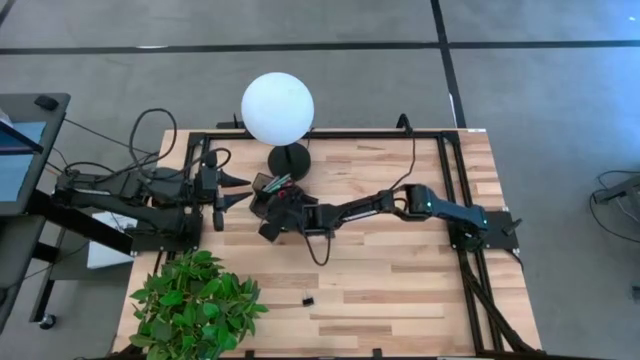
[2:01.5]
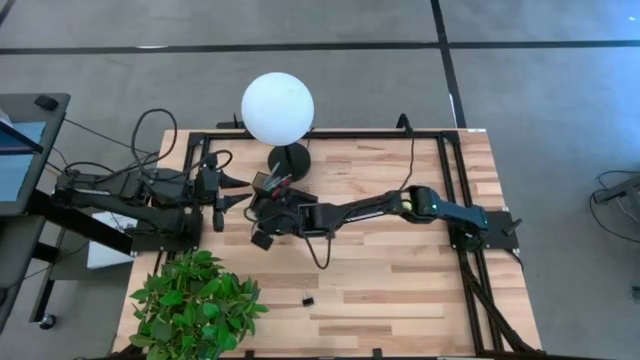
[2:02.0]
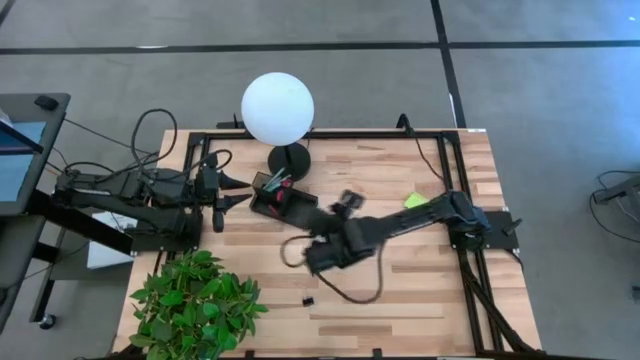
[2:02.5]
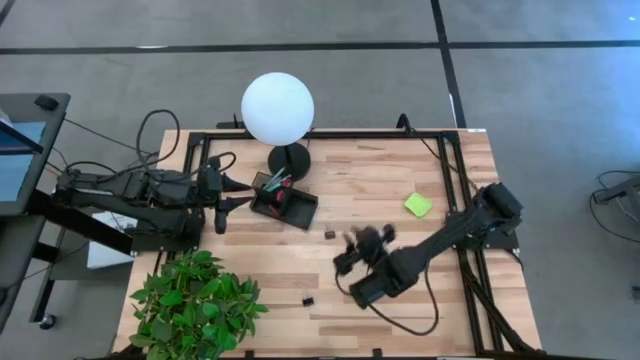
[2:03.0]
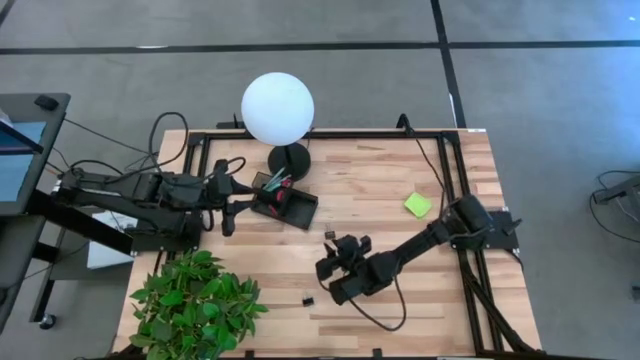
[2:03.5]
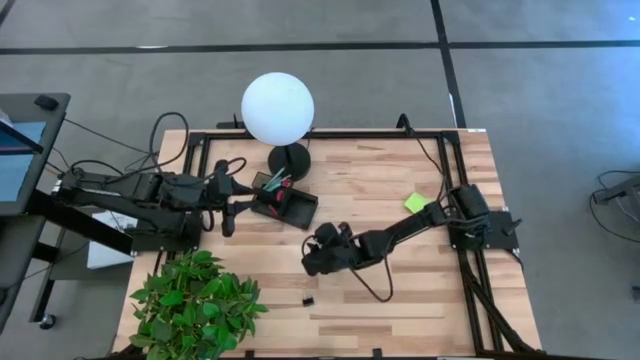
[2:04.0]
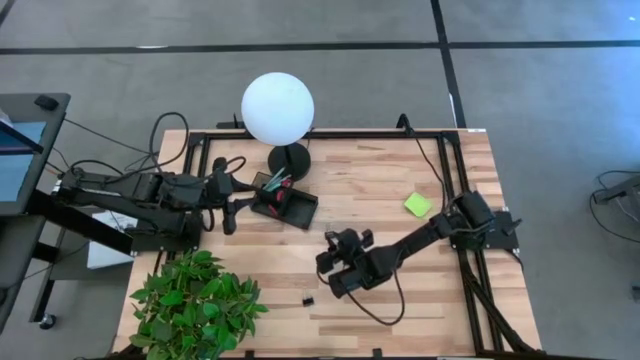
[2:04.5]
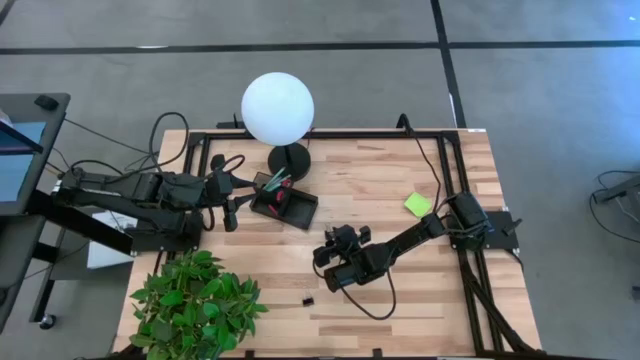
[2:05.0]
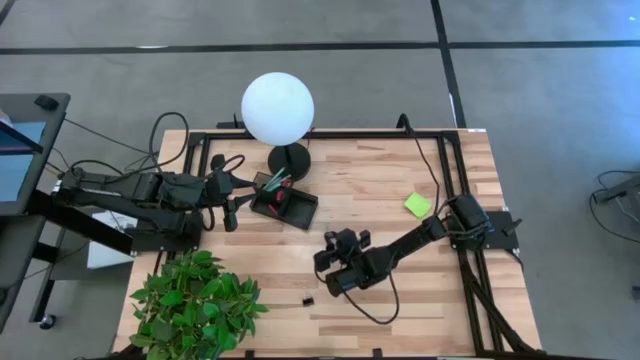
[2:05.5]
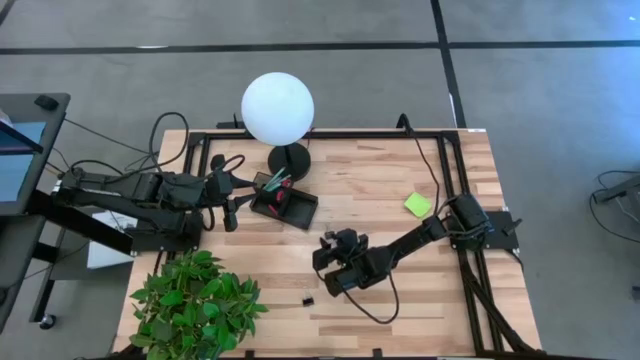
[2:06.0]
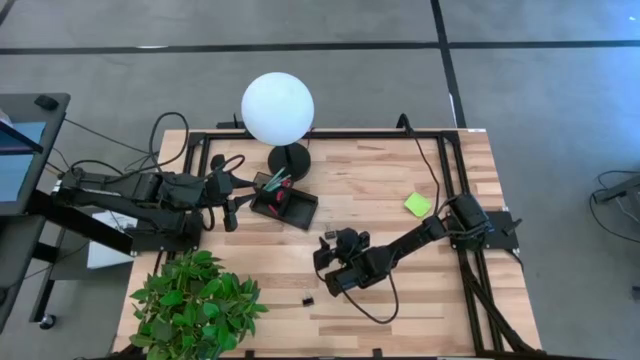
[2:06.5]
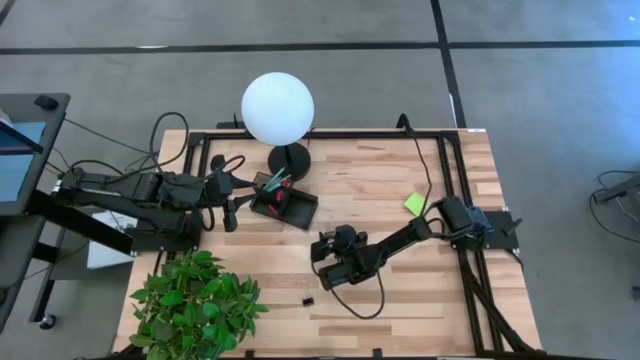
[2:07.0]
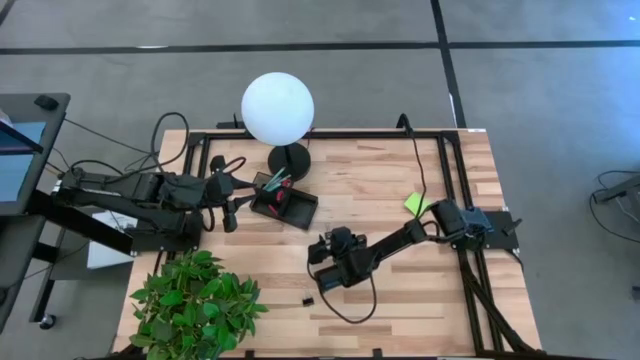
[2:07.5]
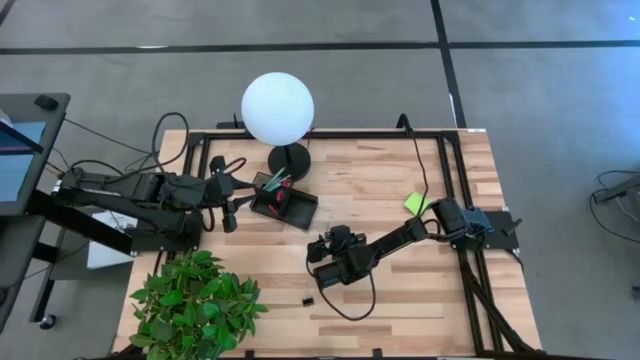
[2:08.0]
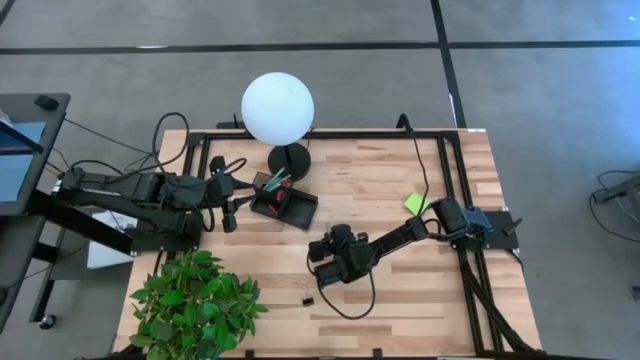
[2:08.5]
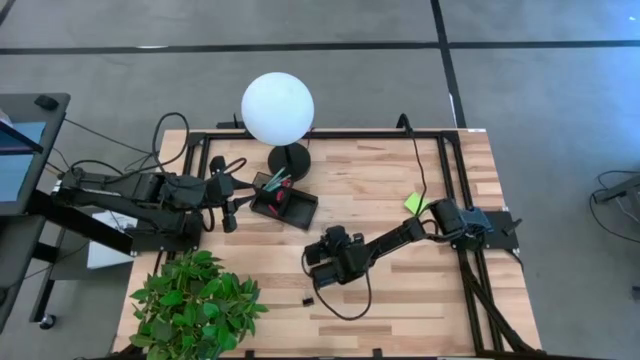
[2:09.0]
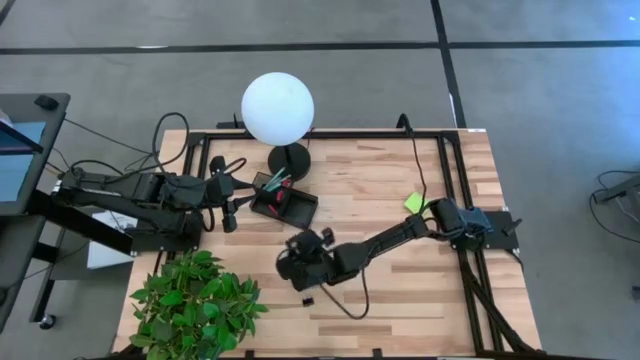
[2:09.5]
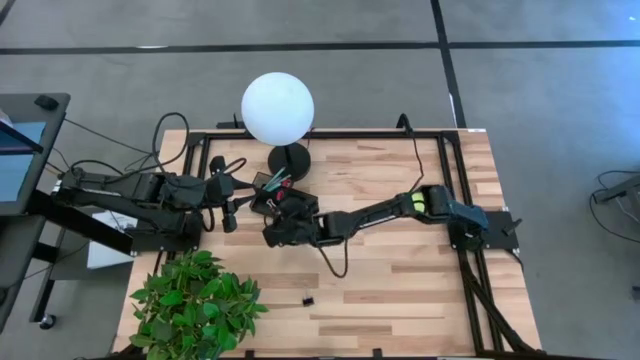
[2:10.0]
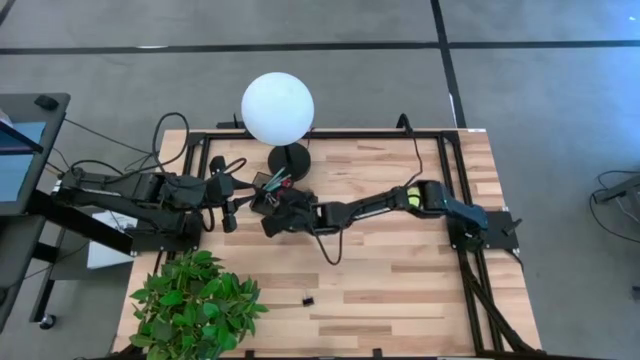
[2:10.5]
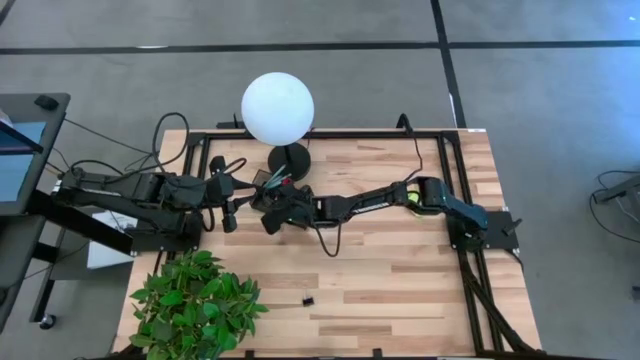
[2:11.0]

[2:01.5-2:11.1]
Task: Pick and place office supplies into organizer
Put the top black binder clip into the black desk organizer

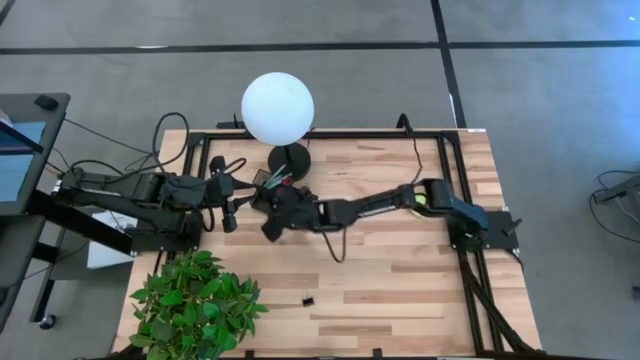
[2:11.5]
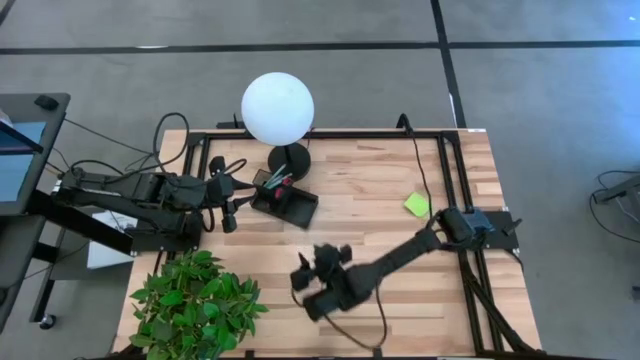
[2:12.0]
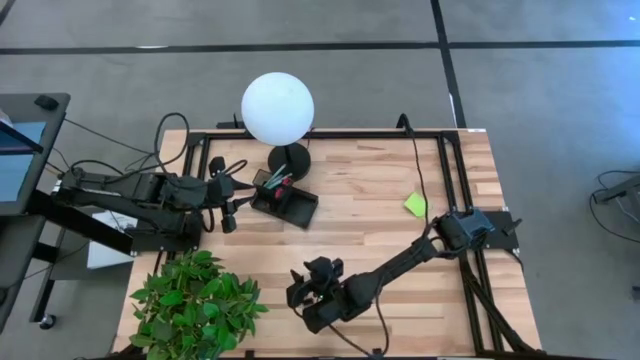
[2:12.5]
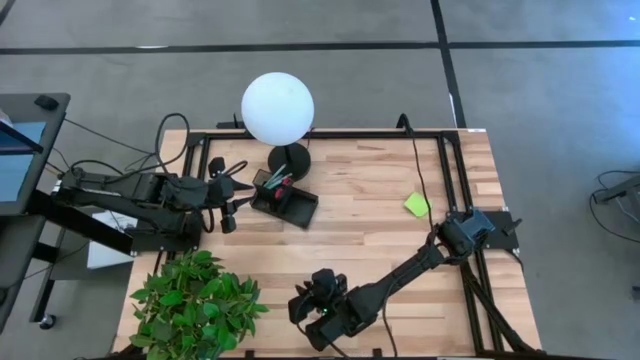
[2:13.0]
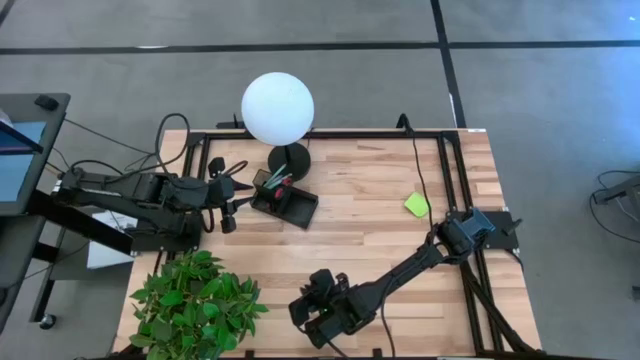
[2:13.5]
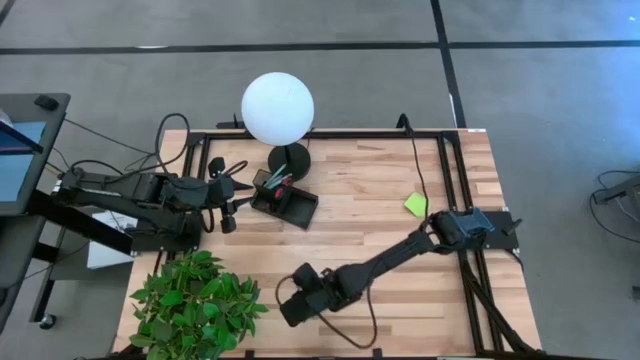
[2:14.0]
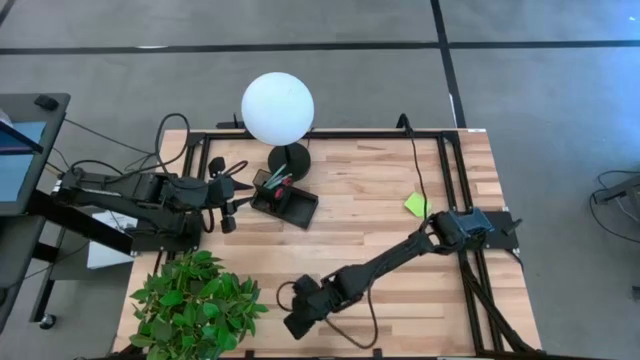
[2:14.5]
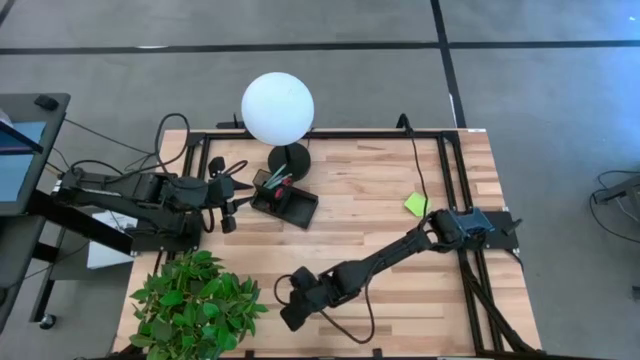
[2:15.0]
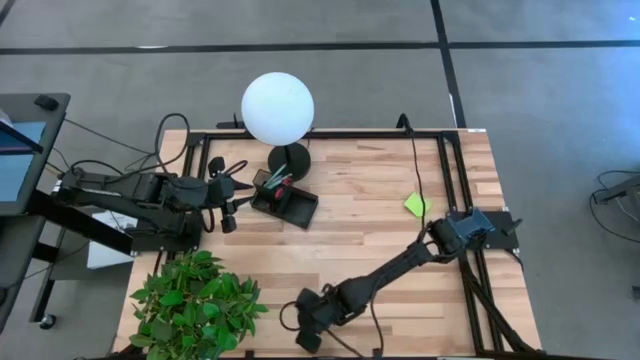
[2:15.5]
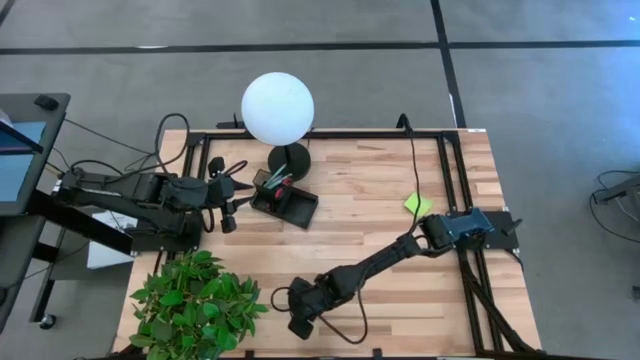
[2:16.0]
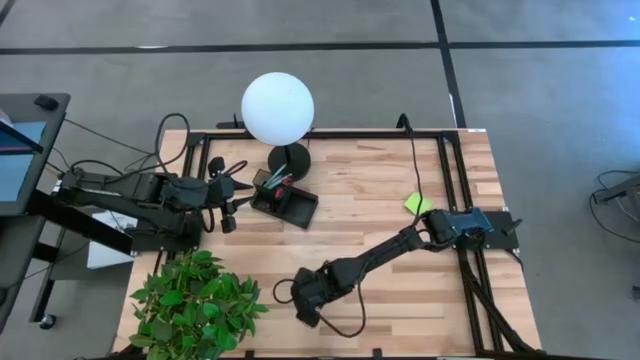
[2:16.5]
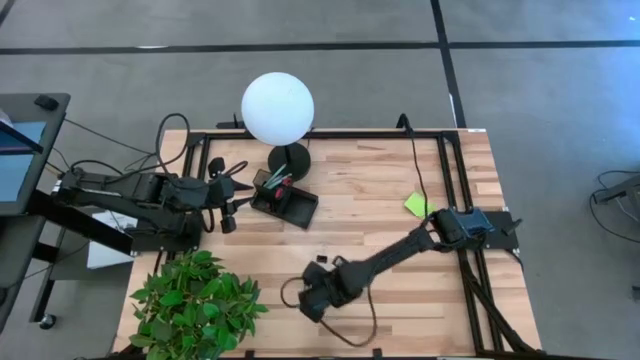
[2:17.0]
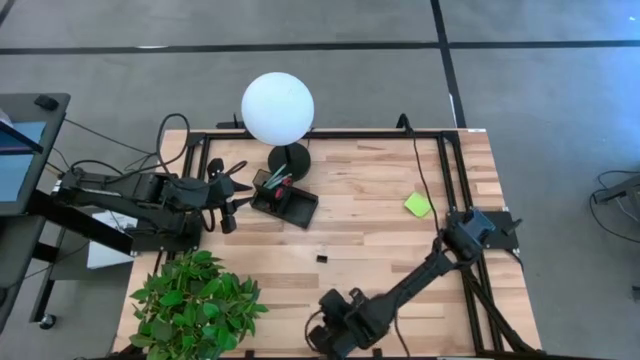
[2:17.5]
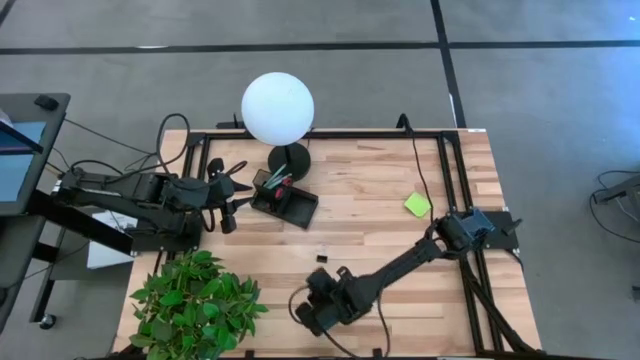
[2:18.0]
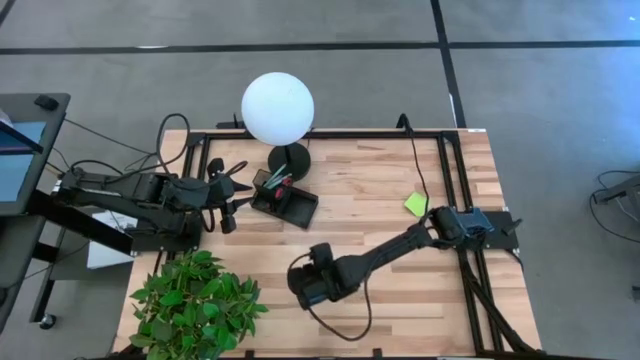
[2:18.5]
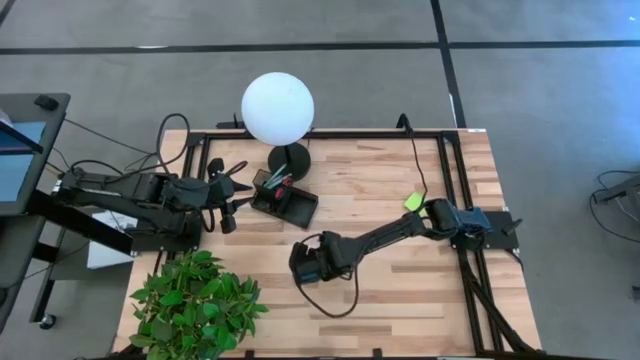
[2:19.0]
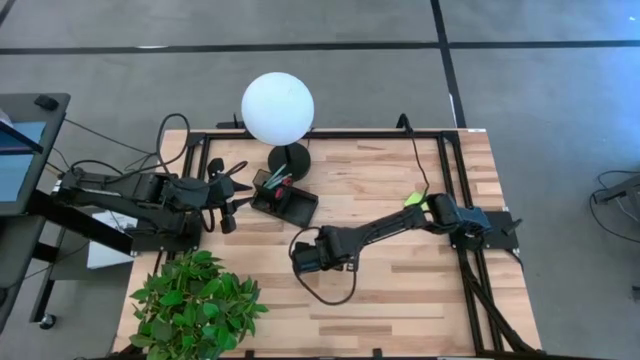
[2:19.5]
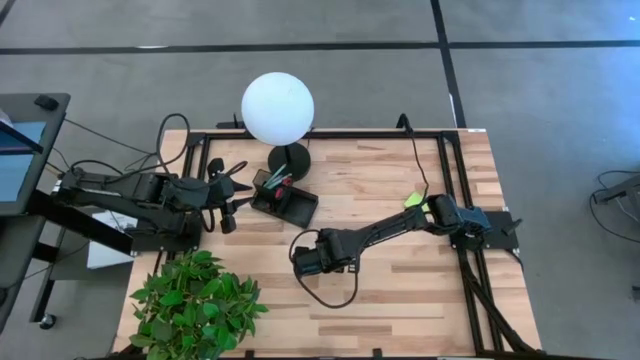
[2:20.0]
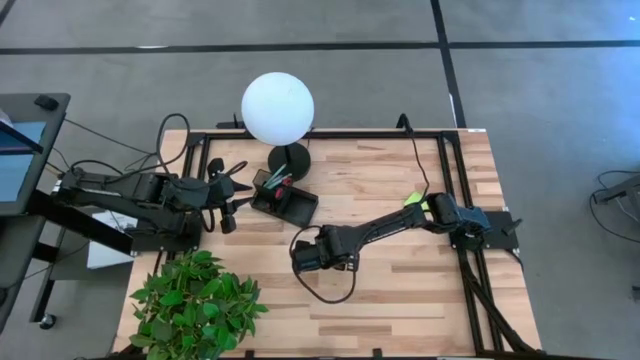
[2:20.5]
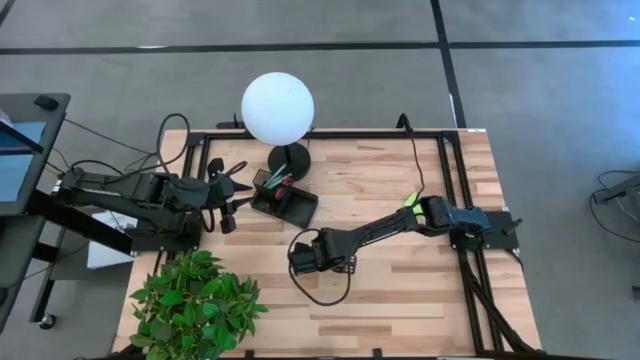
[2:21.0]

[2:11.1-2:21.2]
Put the black binder clip into the black desk organizer

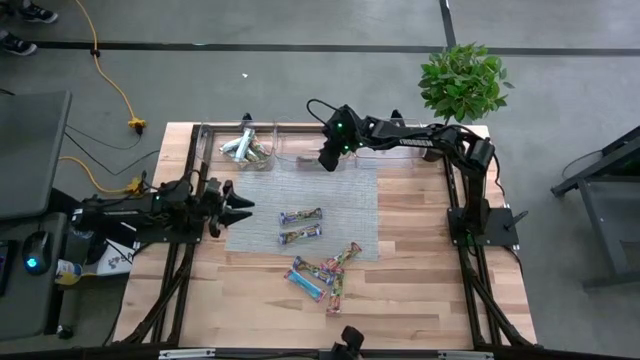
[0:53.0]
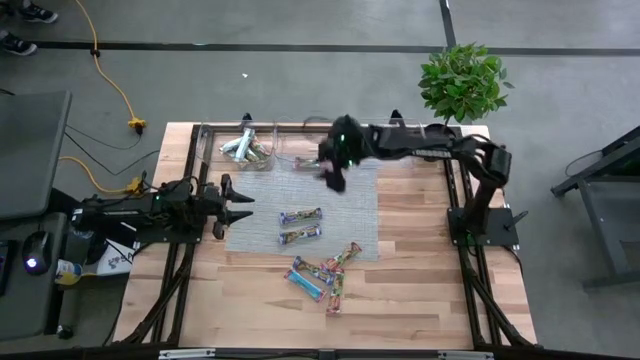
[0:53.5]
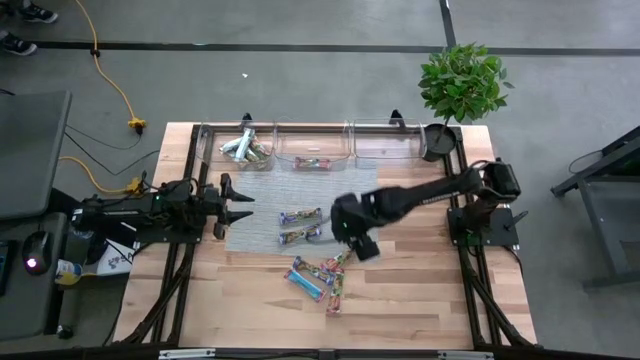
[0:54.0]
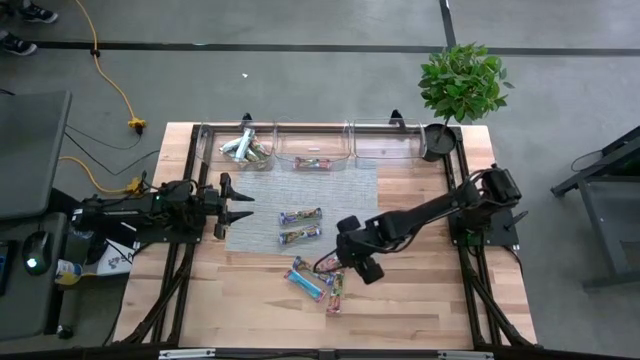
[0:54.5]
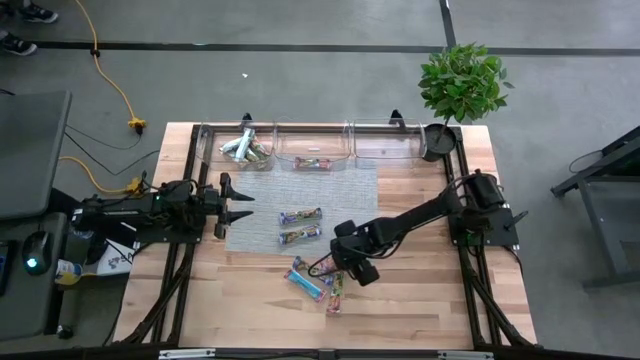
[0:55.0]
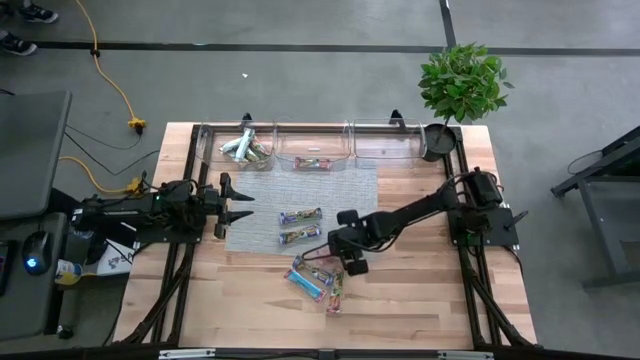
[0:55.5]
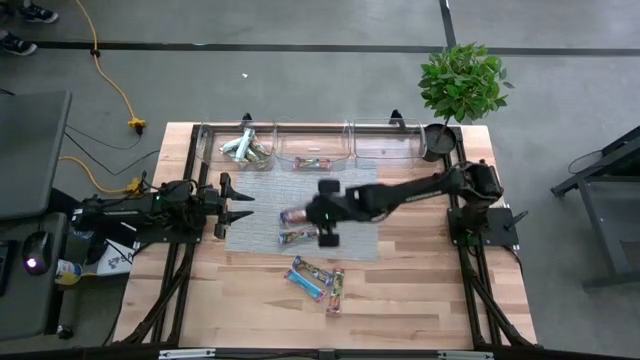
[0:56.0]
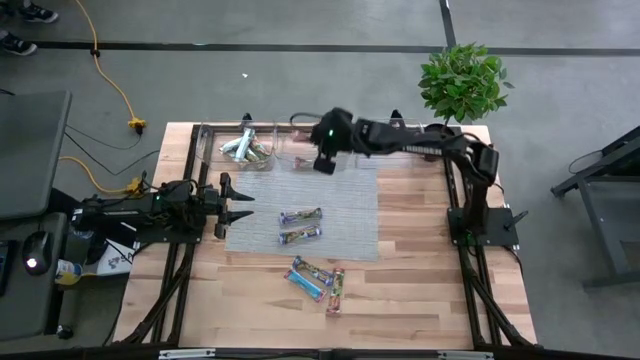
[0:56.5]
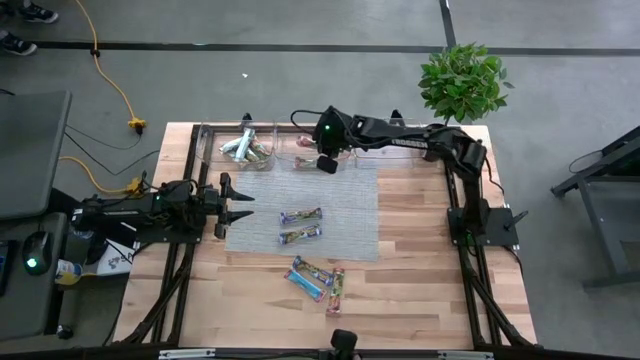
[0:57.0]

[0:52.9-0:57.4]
Task: Pick and place Granola Bars by type
Put the red granola bar into the middle transparent bin
